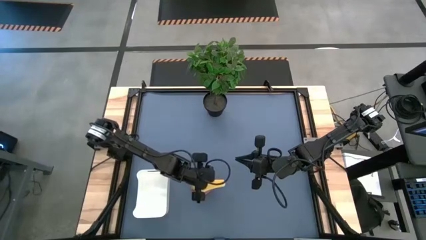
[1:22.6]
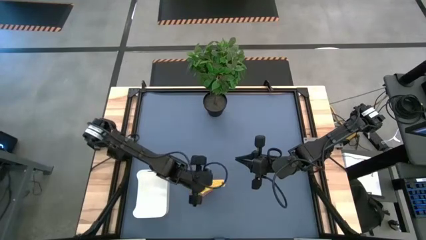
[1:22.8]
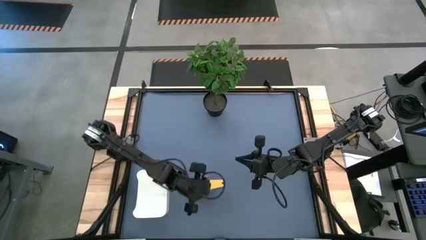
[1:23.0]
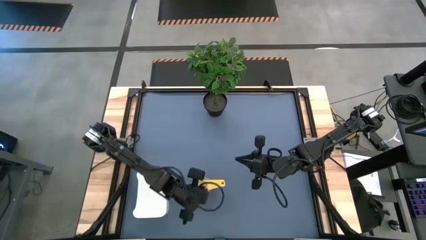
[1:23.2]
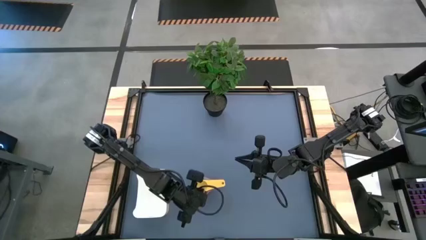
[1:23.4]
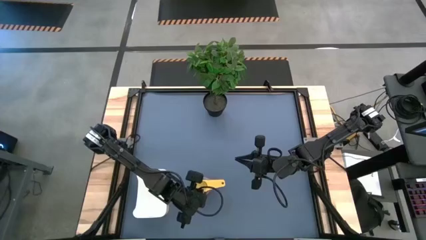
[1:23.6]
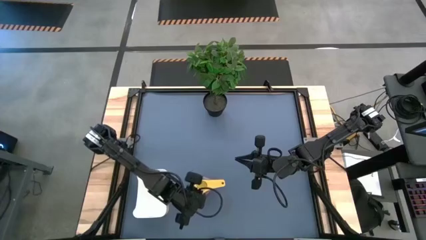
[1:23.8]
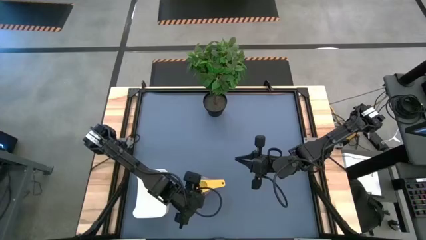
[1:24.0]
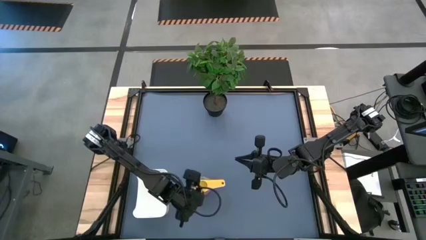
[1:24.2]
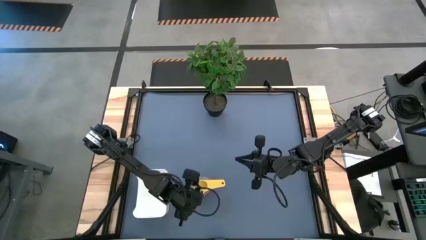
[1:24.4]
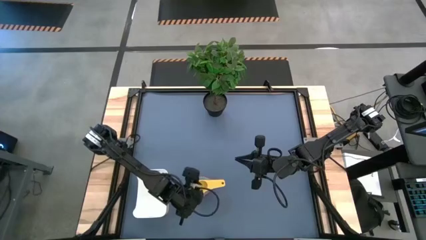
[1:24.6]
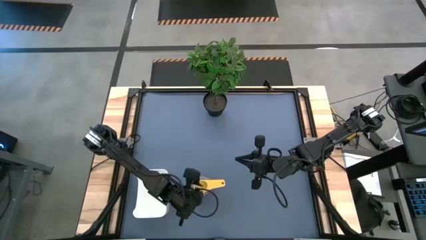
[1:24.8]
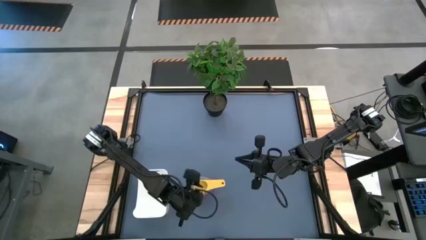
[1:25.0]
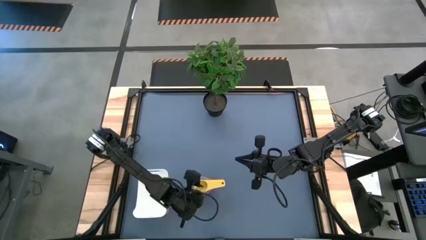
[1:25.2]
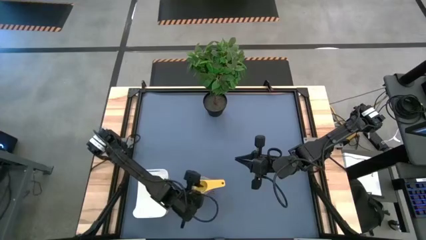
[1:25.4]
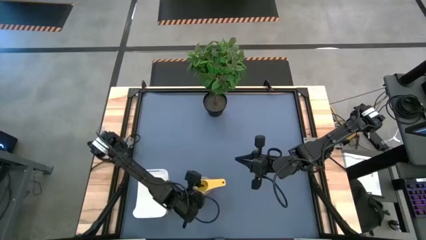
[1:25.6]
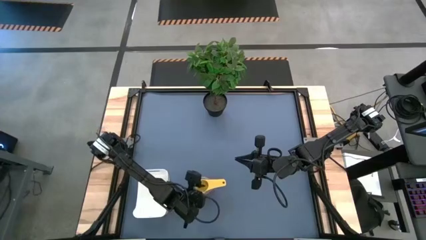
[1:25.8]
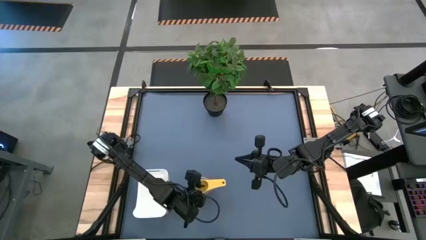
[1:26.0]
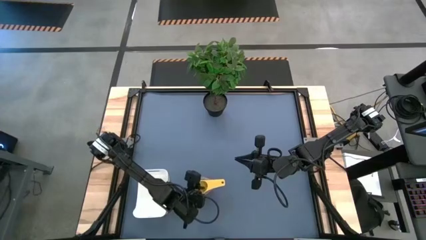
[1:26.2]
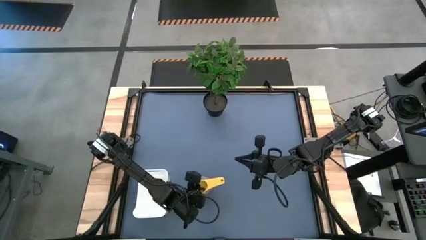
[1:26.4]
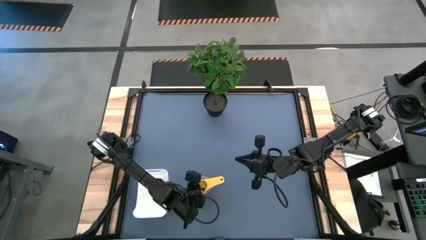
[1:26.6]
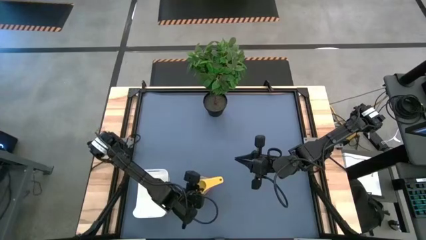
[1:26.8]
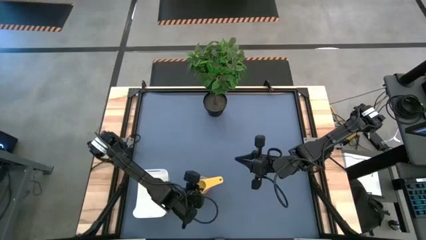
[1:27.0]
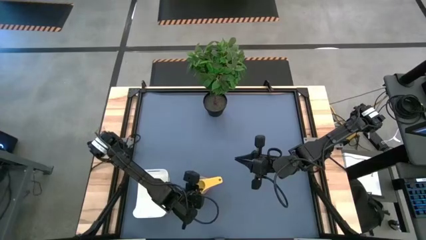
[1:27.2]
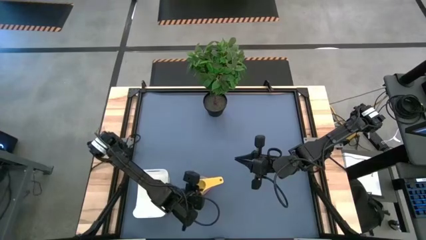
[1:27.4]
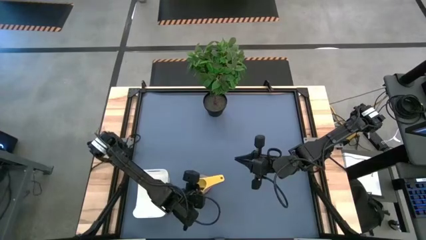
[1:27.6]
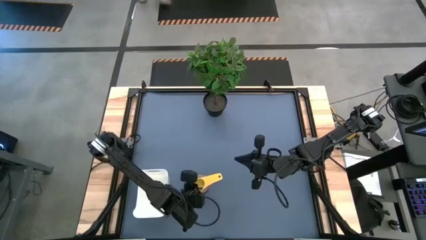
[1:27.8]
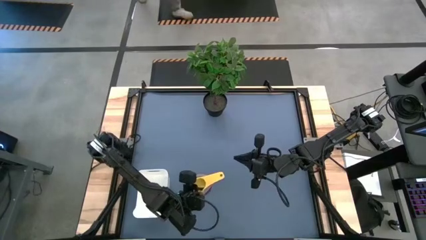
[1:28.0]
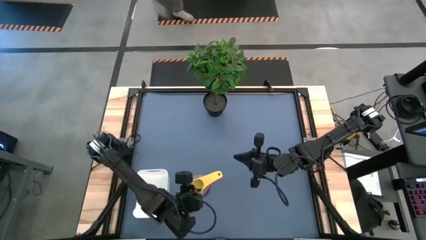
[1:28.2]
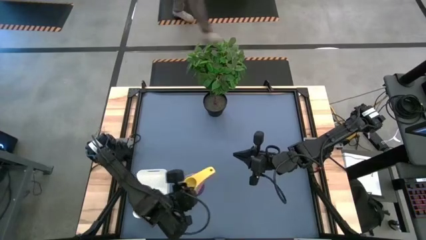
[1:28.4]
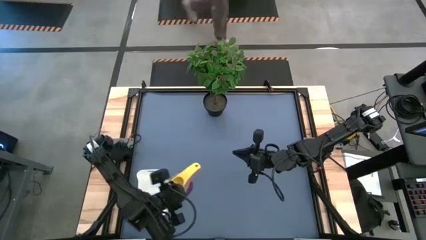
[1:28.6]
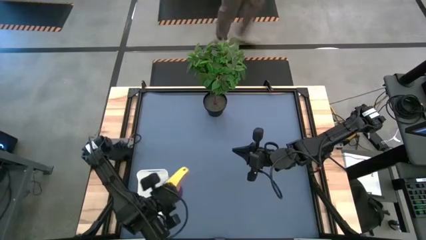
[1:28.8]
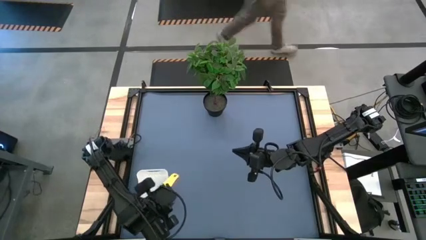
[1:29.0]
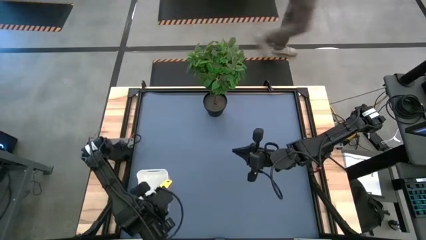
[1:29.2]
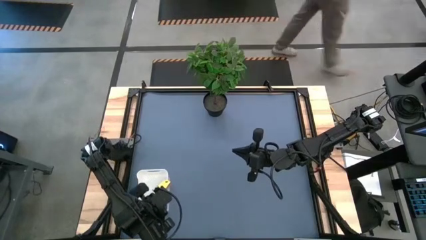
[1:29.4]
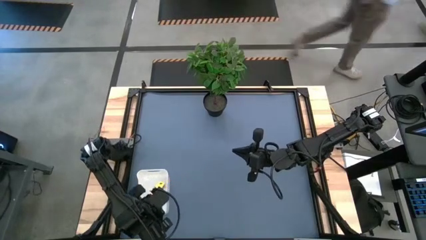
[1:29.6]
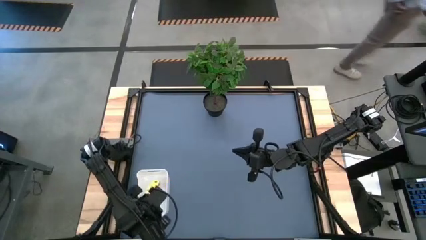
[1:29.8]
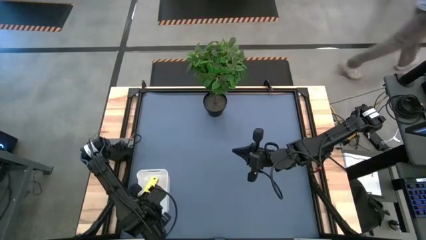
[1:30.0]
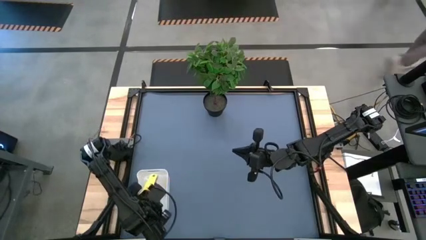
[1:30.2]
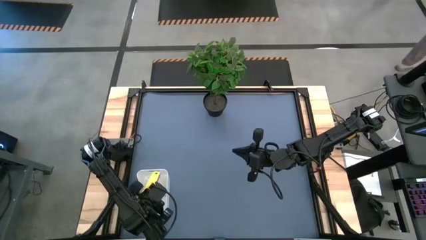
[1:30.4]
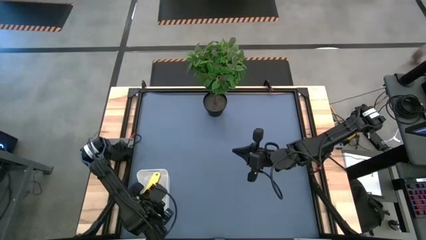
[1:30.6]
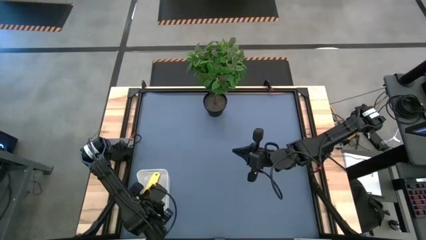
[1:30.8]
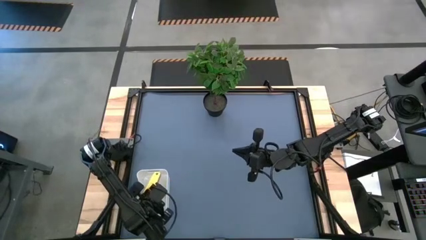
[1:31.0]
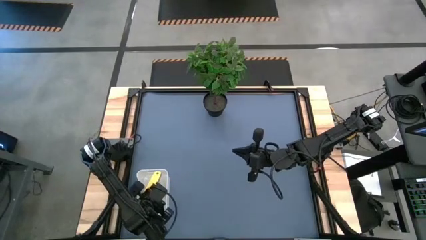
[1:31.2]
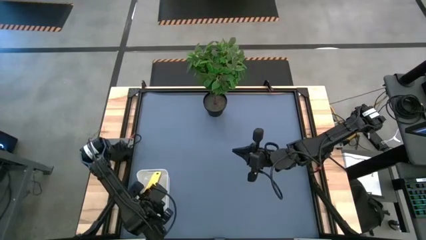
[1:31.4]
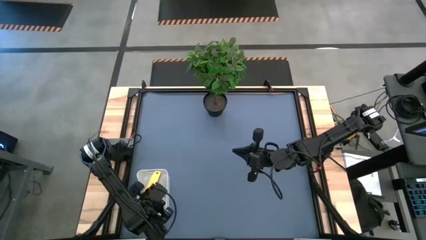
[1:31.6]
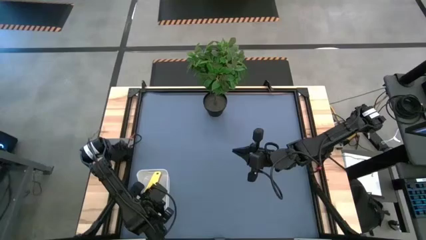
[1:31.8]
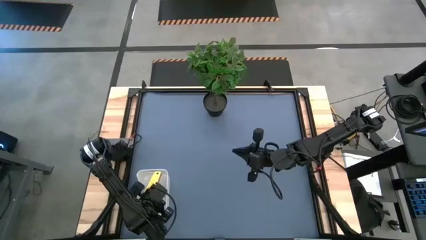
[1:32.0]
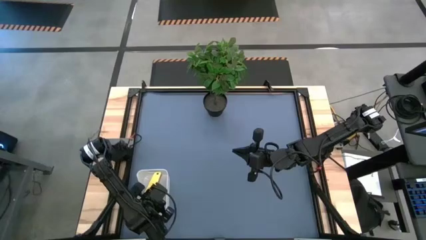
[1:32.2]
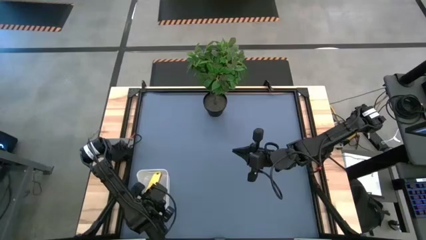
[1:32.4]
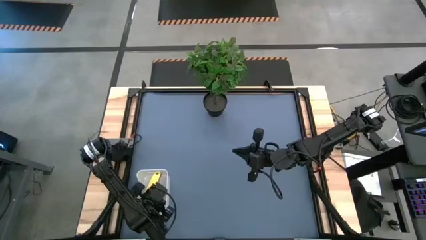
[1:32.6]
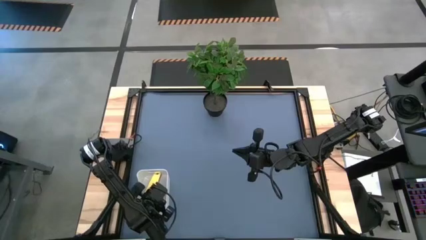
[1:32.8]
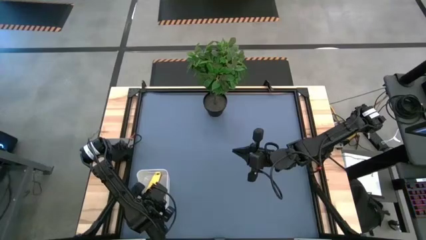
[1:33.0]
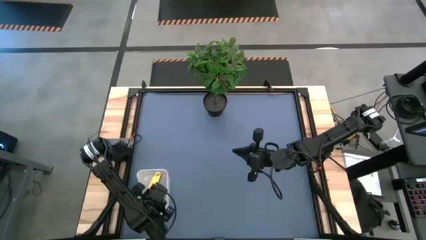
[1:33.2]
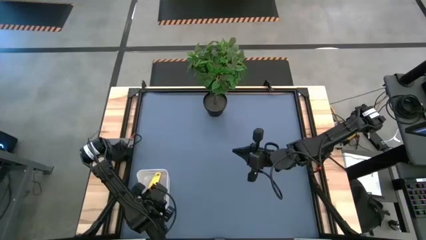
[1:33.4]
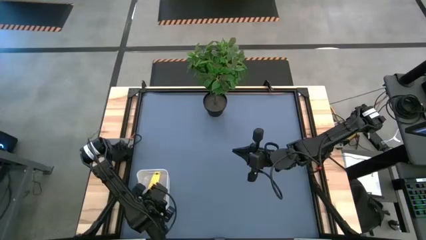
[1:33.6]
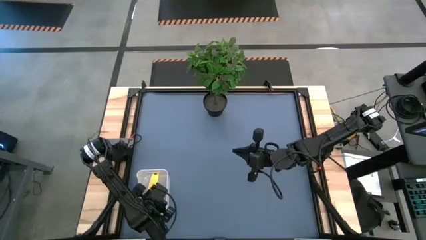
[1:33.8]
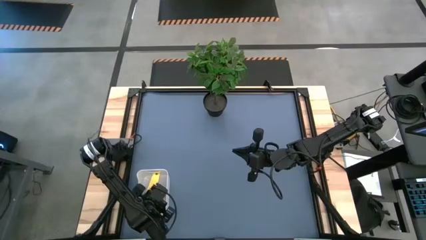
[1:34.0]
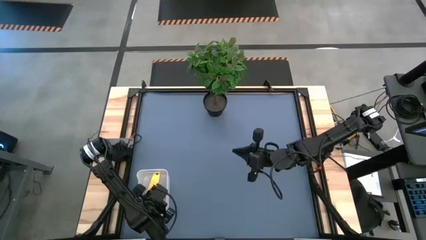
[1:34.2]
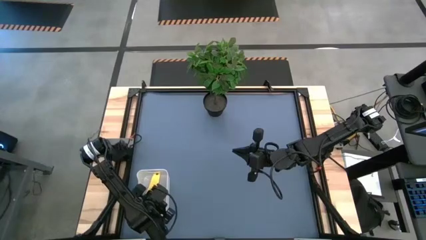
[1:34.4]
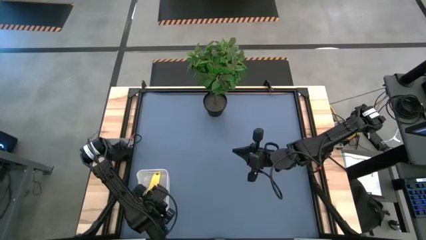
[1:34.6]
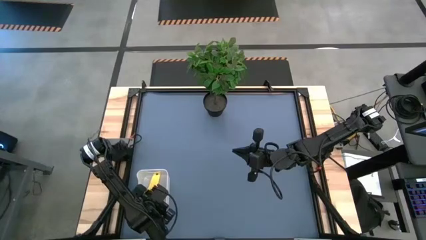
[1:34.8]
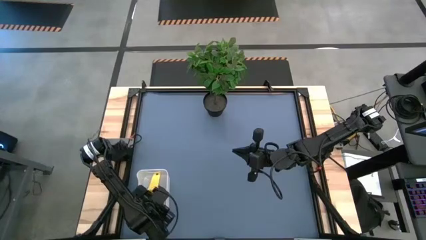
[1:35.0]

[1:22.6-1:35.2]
Task: Nest measuring cups in basket
Put the set of measuring cups into the white bin
